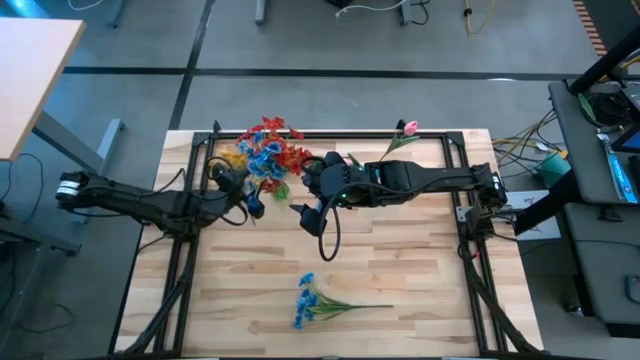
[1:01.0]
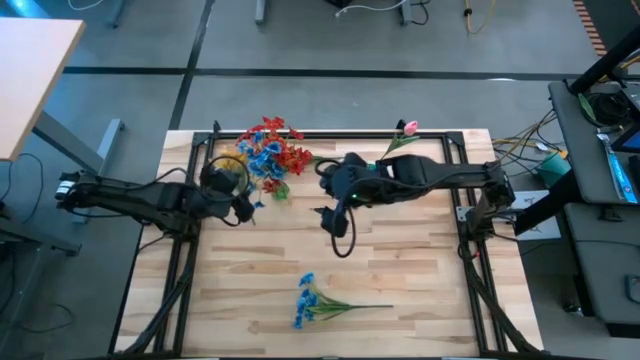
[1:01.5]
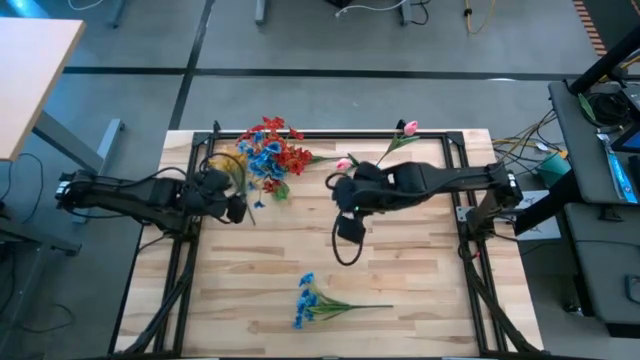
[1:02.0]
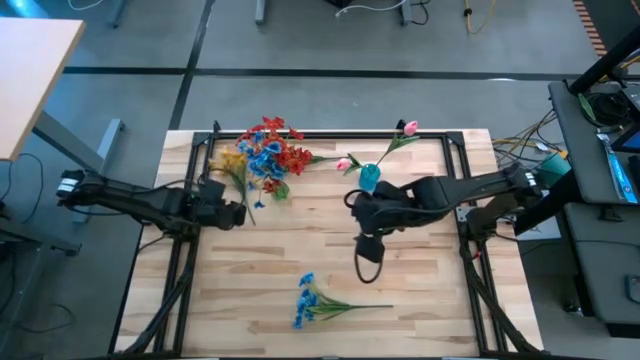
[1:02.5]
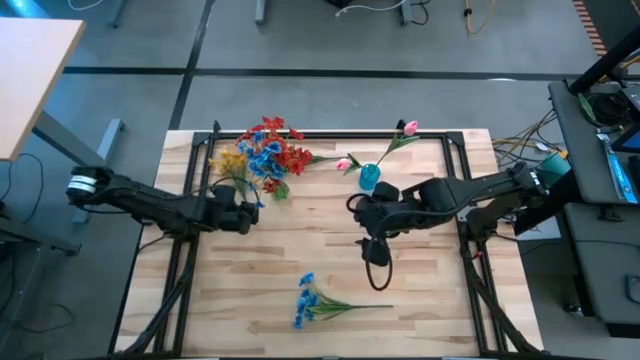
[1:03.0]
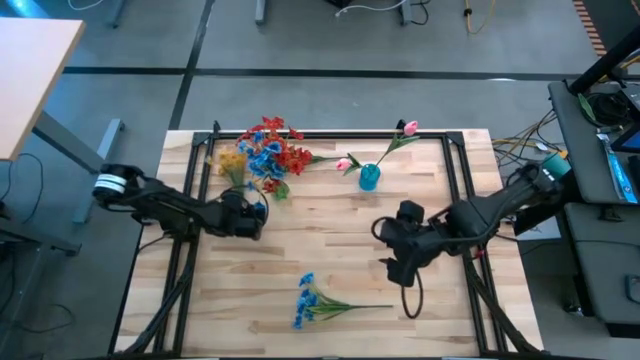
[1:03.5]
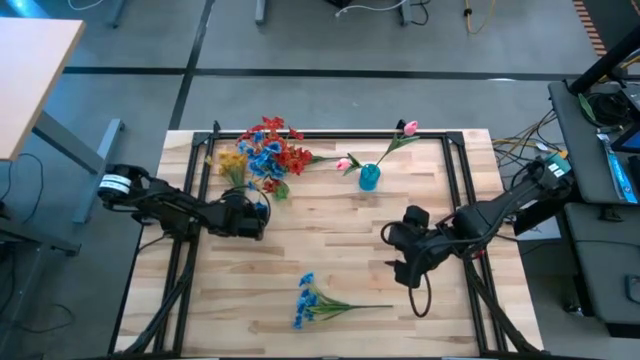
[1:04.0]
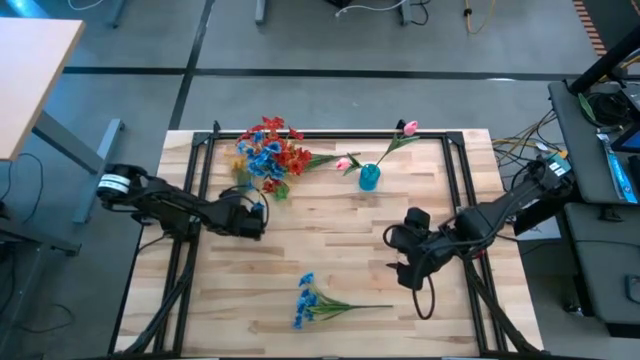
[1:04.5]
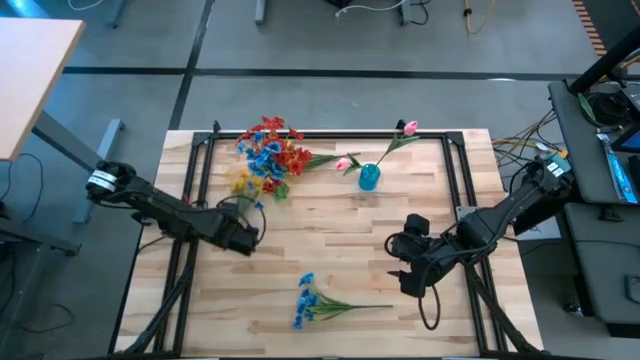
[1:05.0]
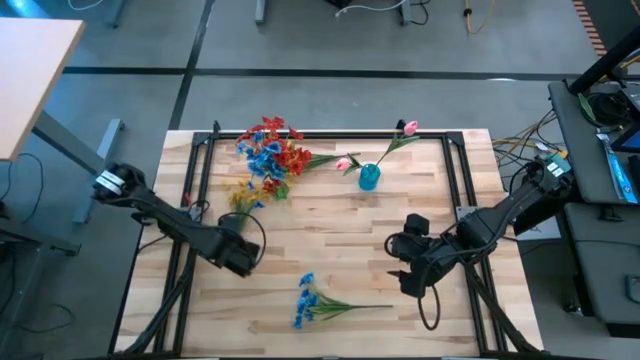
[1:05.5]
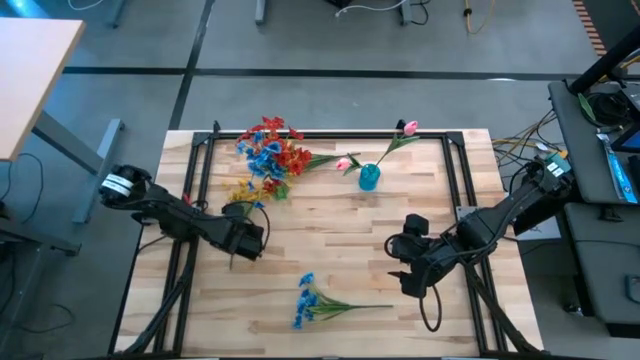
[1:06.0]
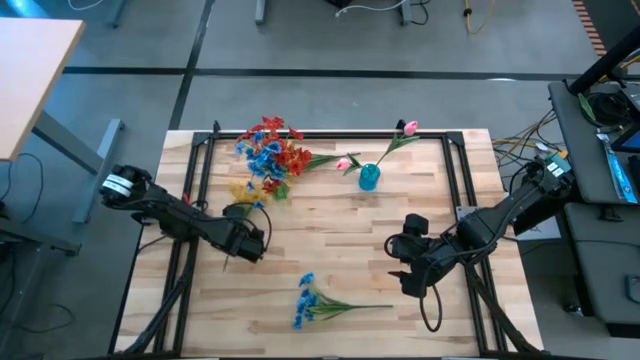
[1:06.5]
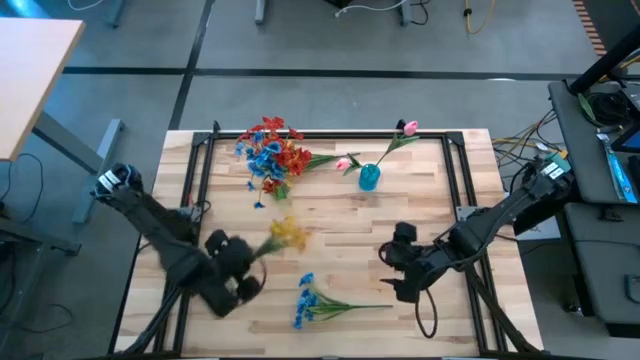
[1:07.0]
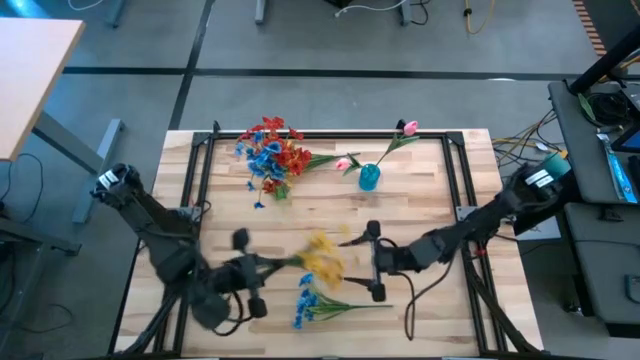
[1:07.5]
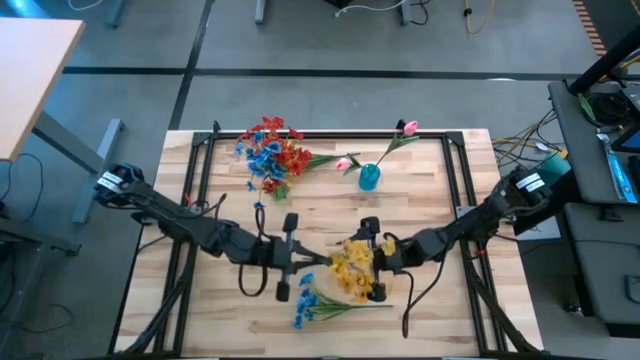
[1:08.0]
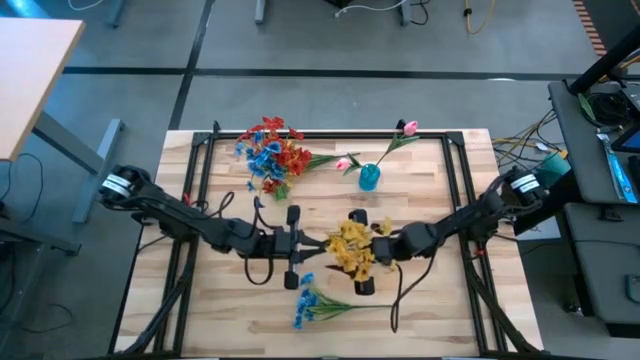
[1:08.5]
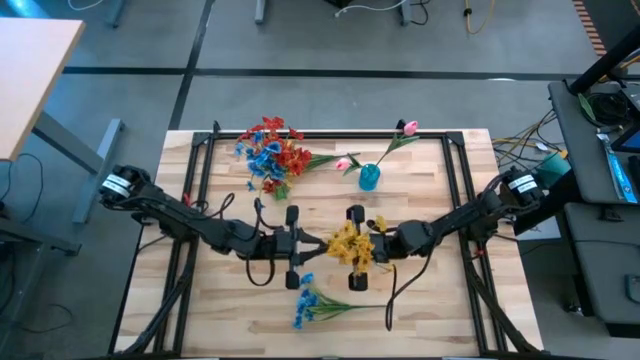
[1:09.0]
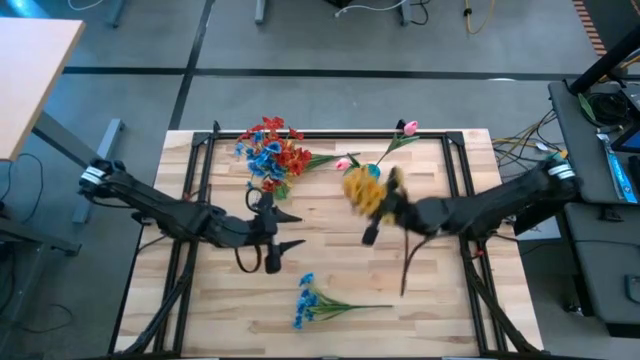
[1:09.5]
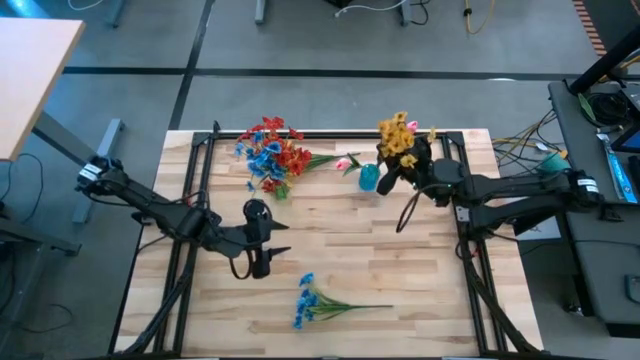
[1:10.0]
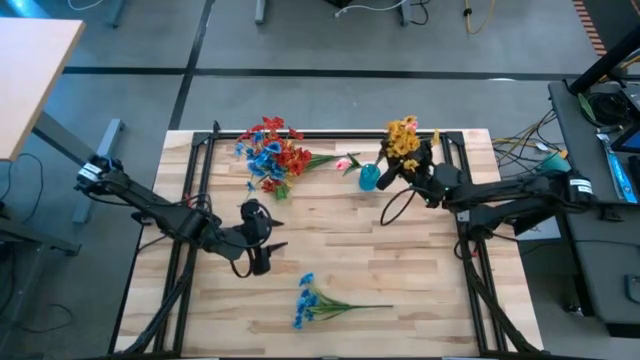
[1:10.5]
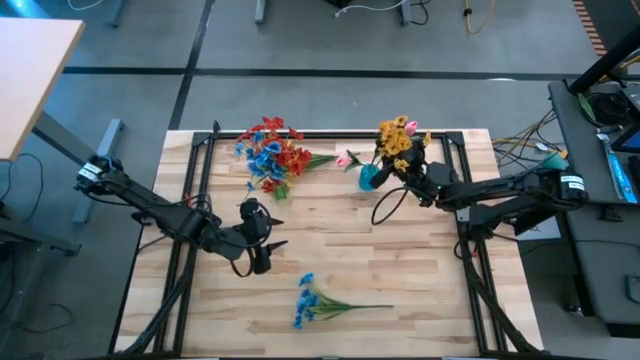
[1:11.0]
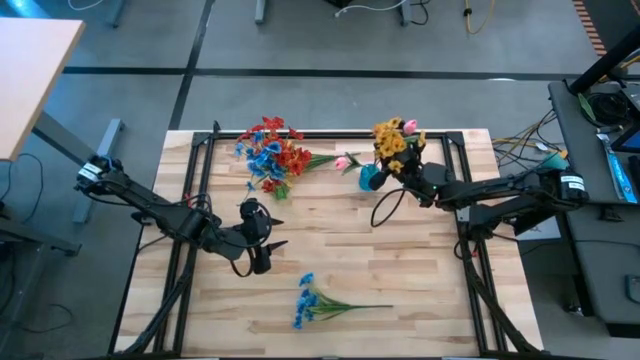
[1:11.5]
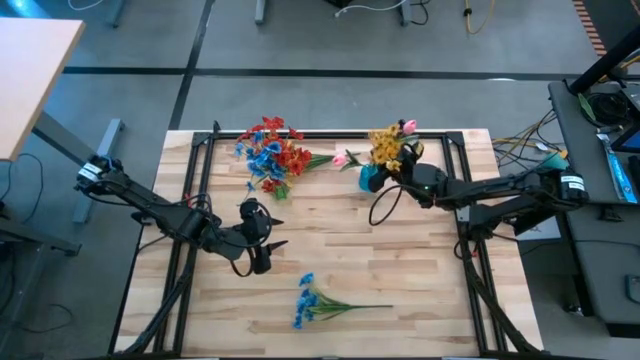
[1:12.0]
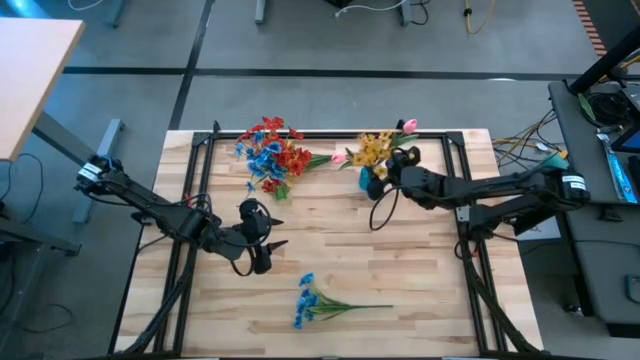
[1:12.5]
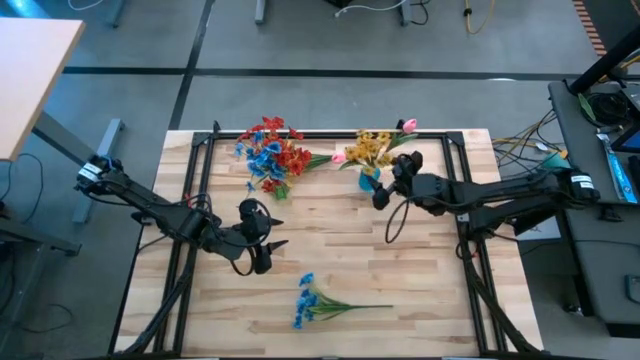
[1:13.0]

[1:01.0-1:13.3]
Task: Sort flowers into vase by color
Put the left yellow flowers into the blue vase

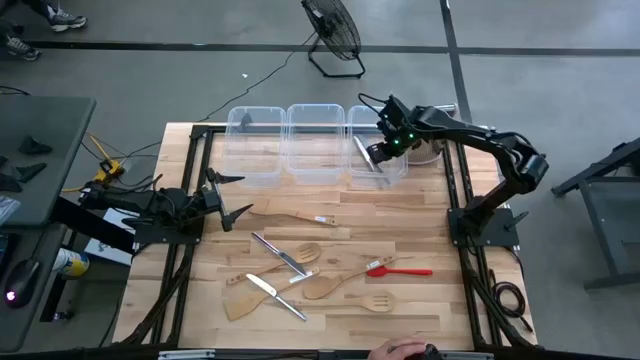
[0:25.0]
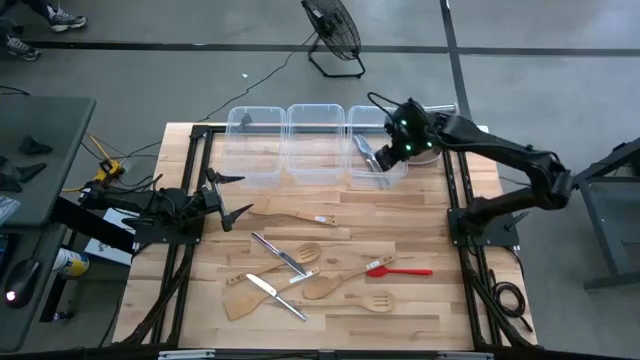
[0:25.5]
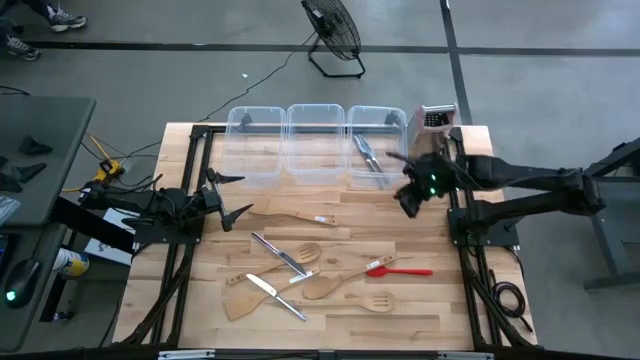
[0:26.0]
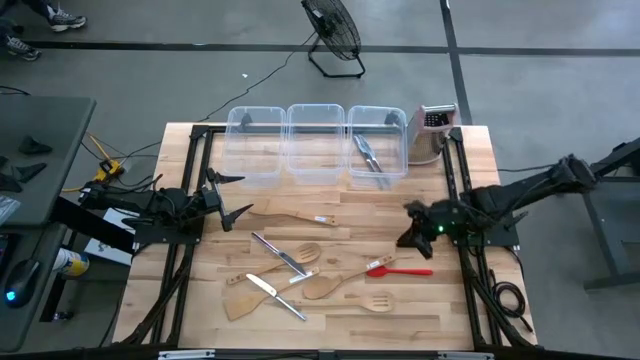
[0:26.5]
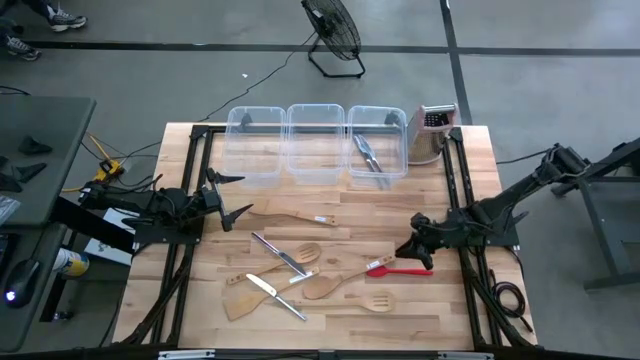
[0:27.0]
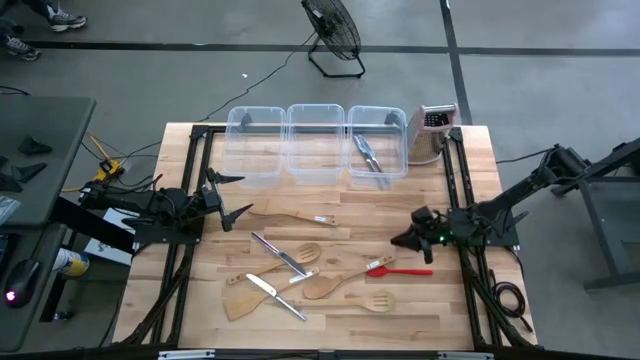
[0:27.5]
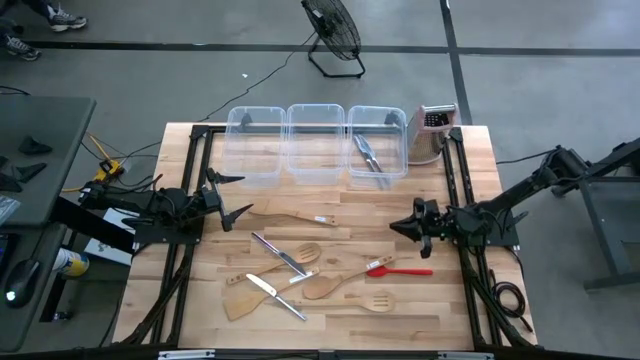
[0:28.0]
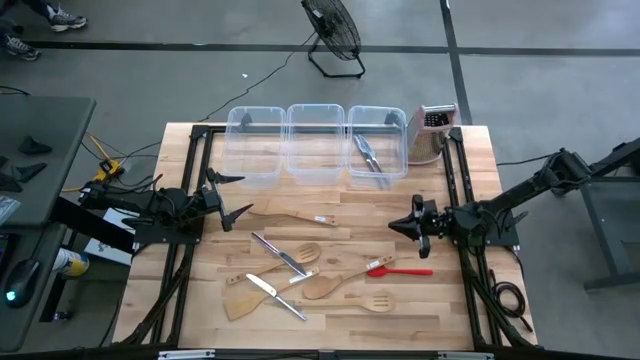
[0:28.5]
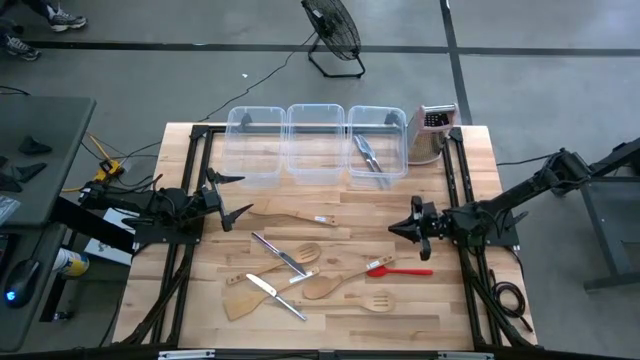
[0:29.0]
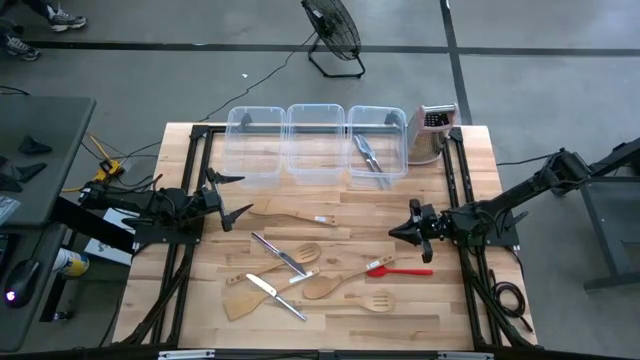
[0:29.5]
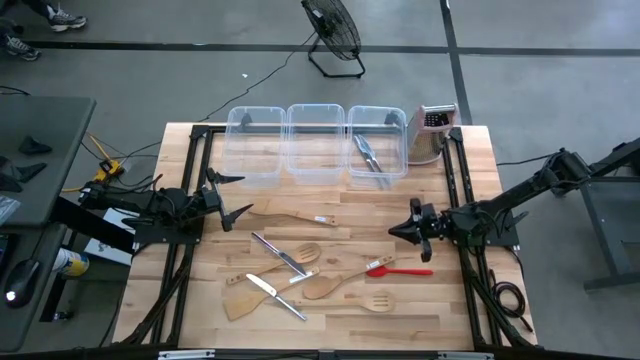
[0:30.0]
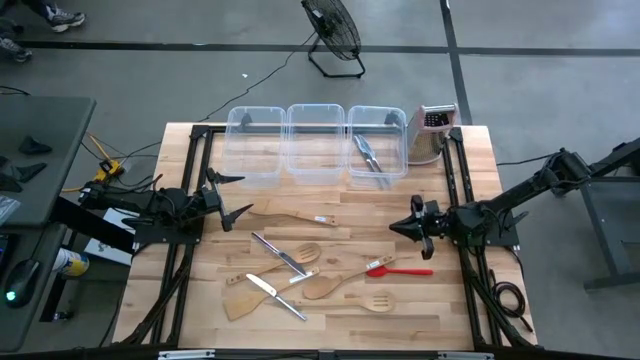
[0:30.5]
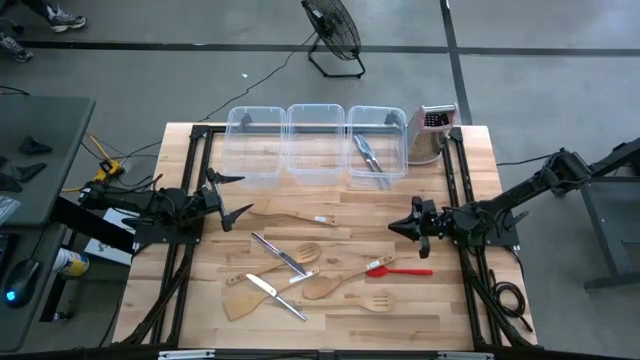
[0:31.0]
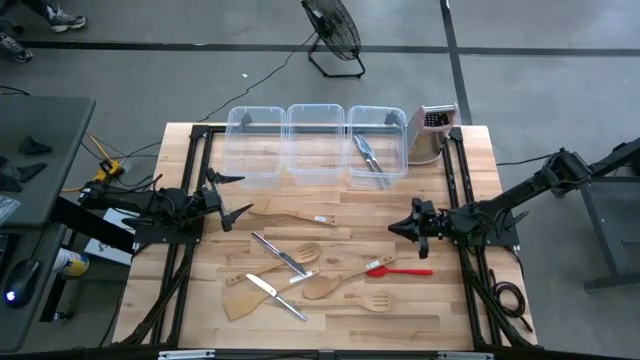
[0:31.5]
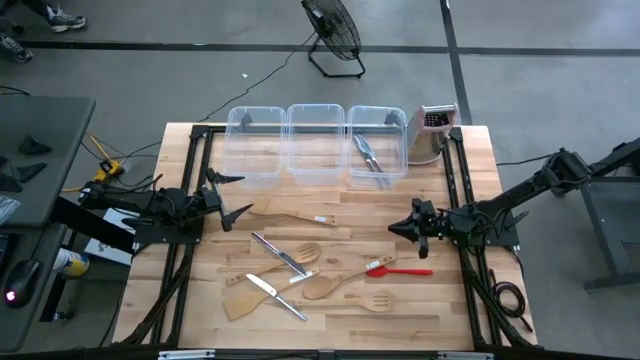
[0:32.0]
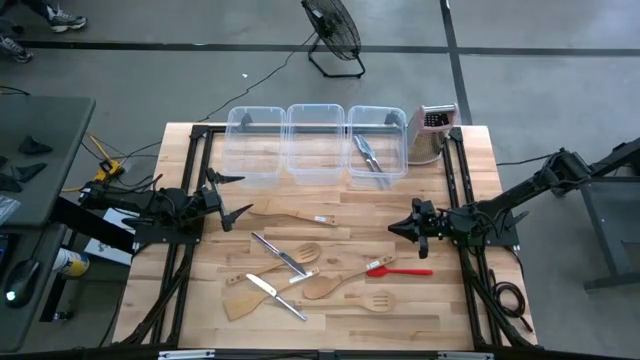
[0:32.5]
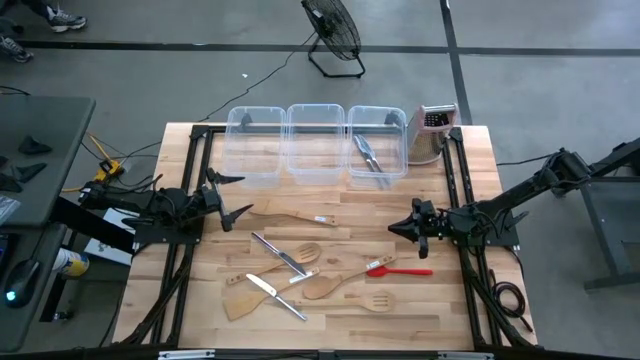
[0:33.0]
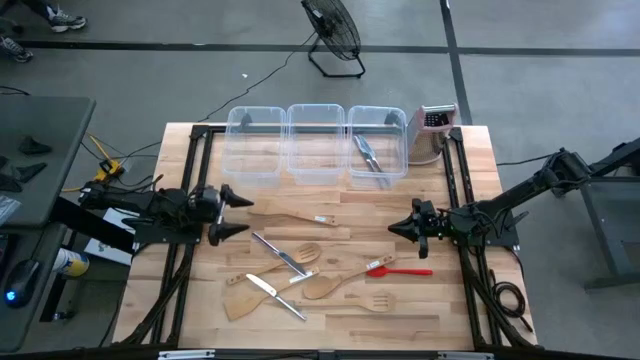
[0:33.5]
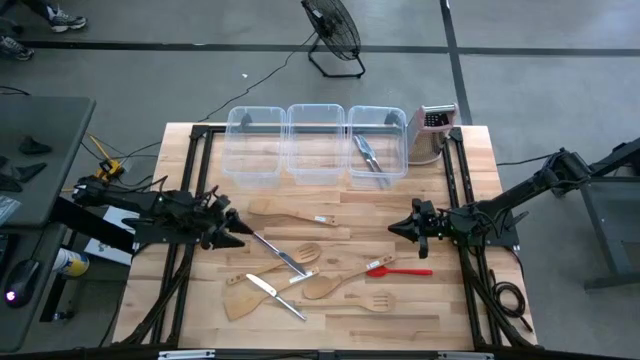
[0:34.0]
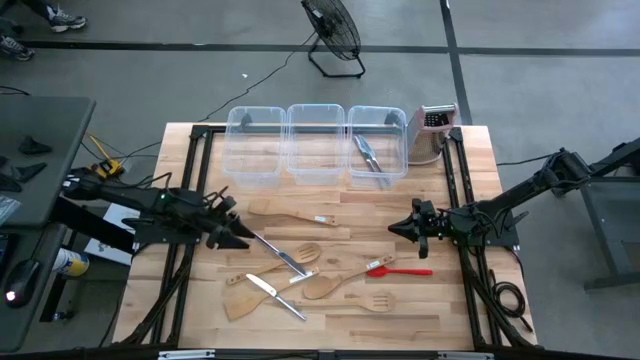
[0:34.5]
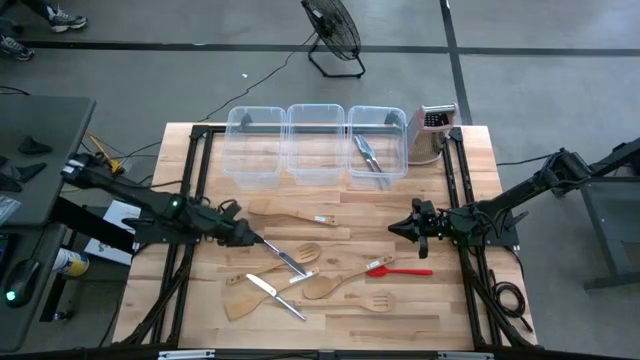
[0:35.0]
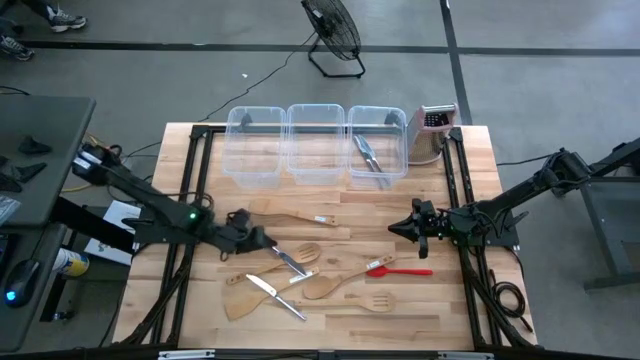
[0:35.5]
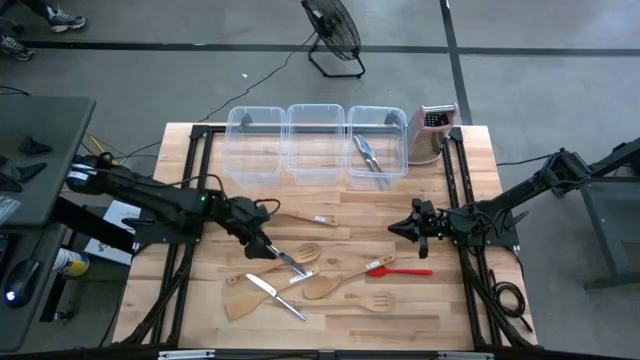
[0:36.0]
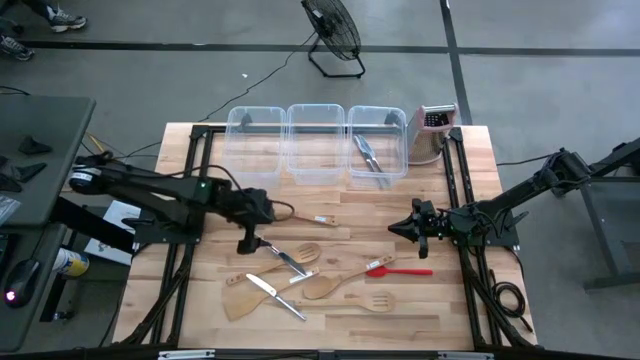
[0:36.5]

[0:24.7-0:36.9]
Task: Pick & Place Kitchen Items
Put the table knife into the right transparent bin
